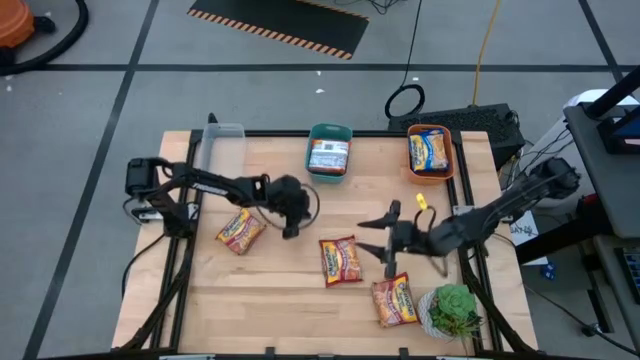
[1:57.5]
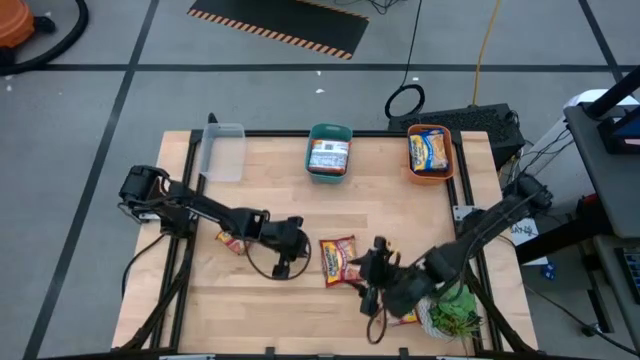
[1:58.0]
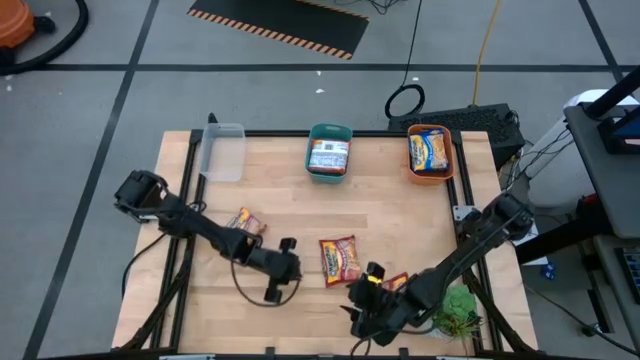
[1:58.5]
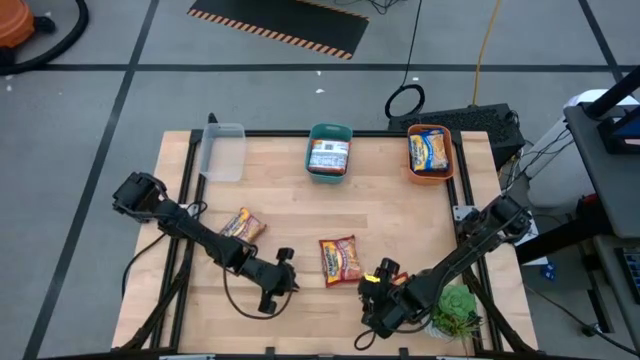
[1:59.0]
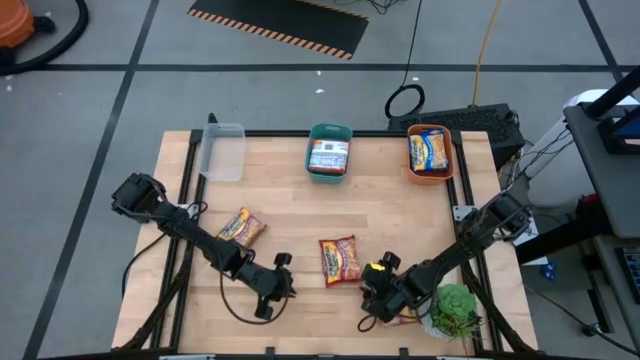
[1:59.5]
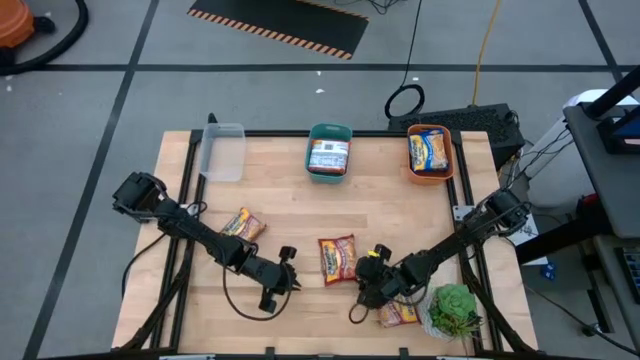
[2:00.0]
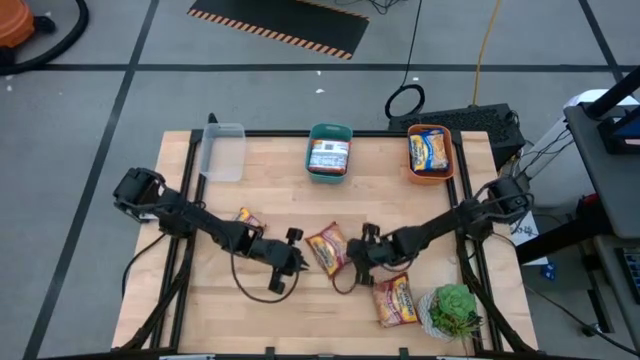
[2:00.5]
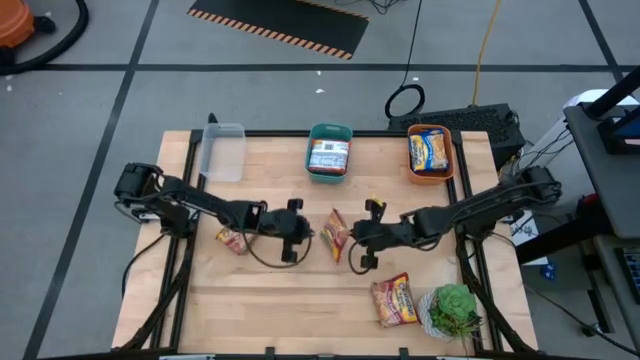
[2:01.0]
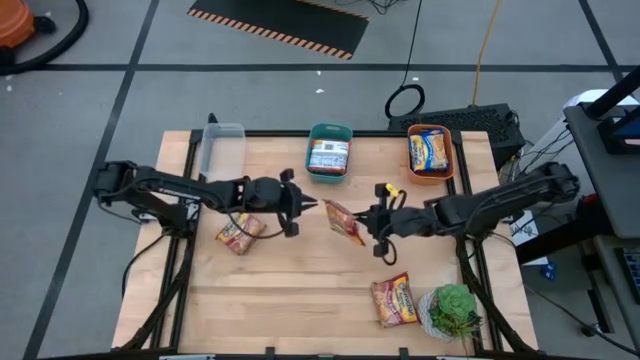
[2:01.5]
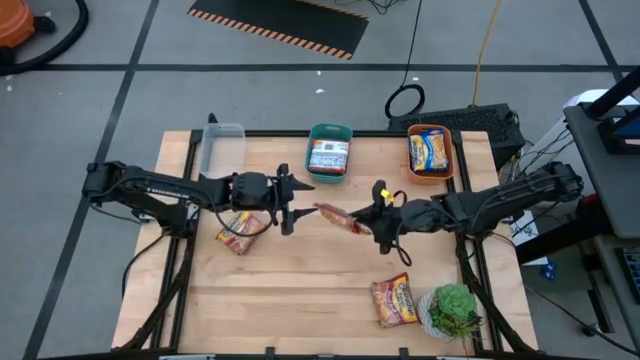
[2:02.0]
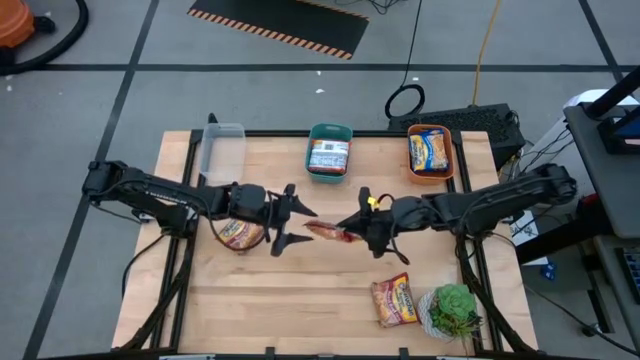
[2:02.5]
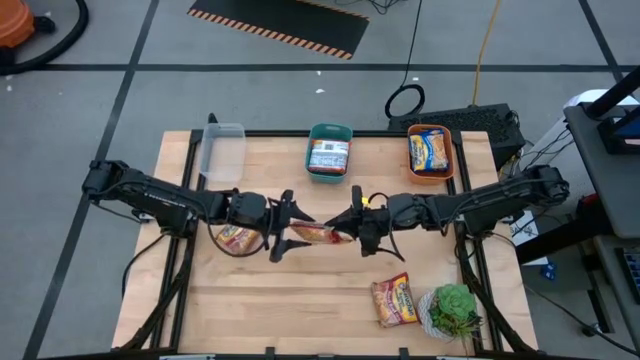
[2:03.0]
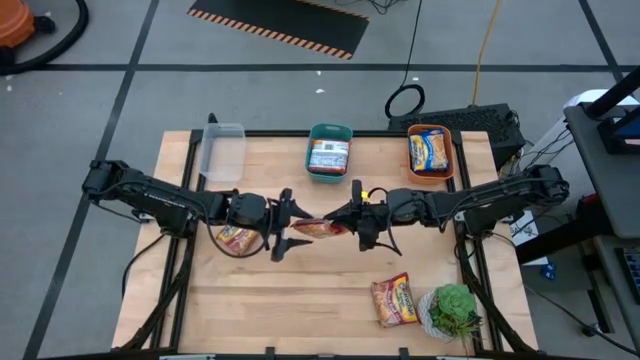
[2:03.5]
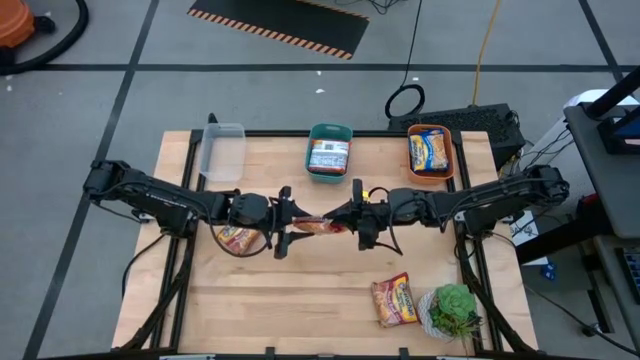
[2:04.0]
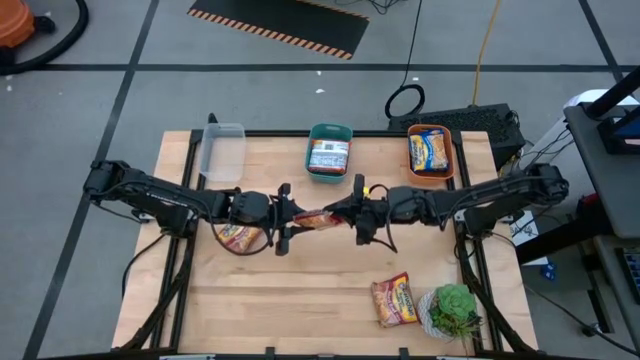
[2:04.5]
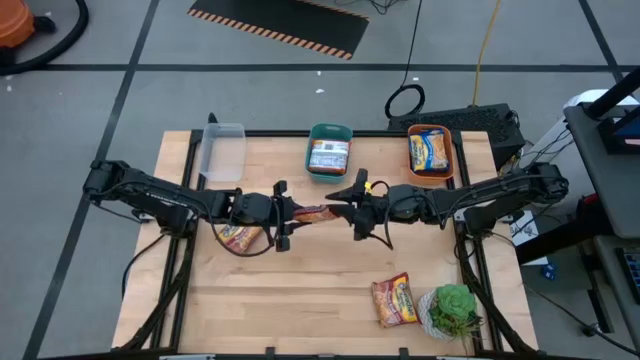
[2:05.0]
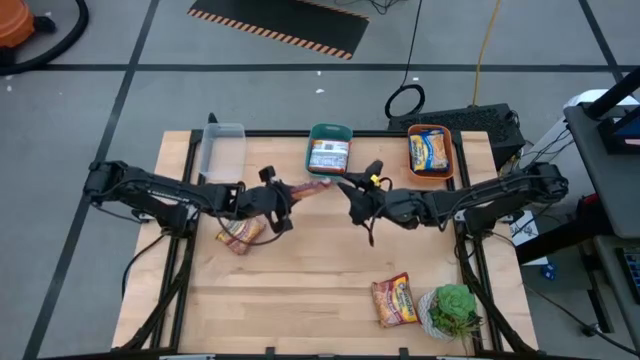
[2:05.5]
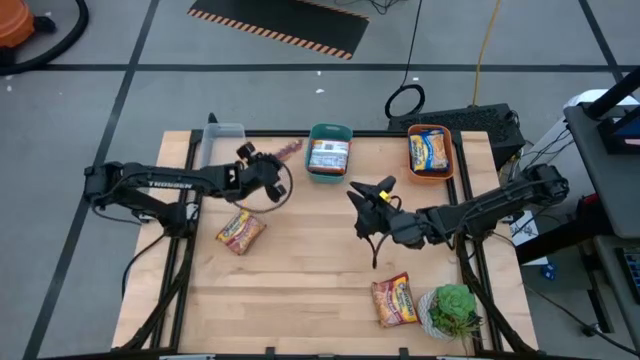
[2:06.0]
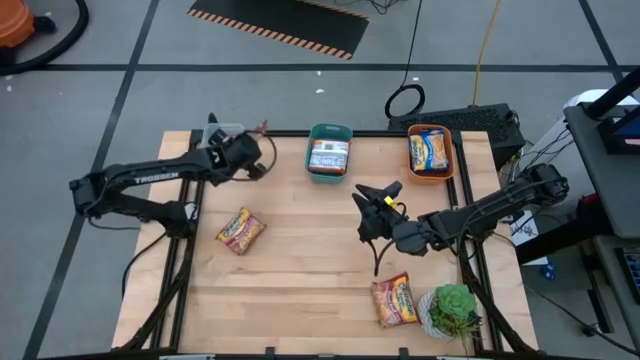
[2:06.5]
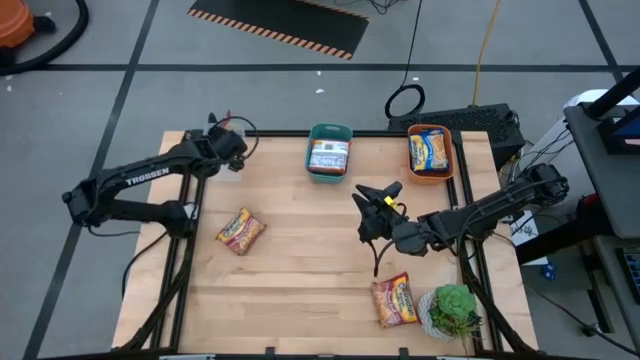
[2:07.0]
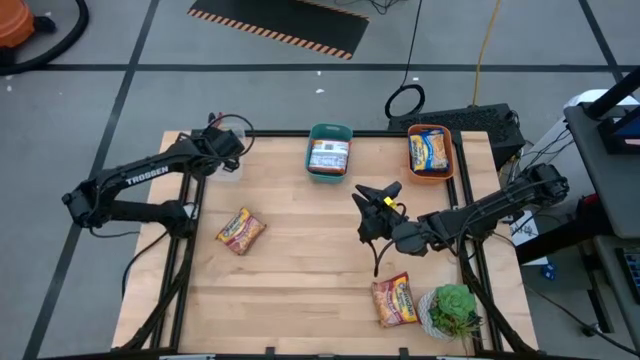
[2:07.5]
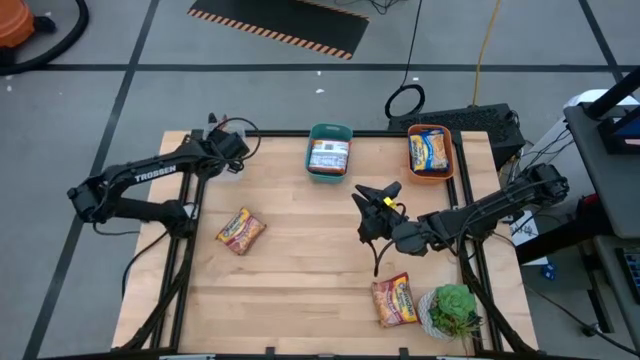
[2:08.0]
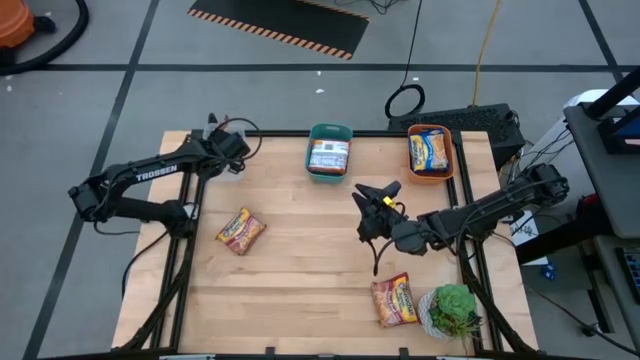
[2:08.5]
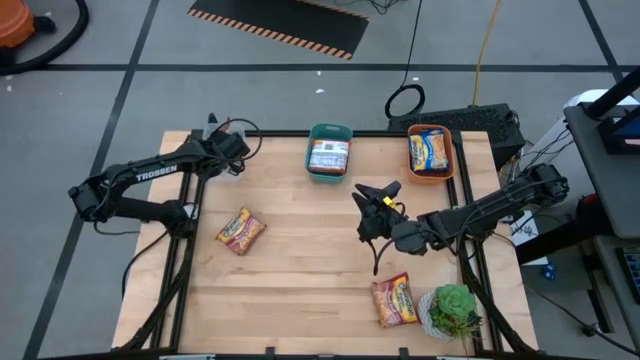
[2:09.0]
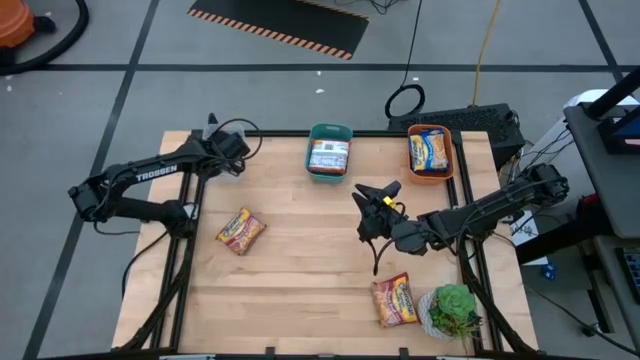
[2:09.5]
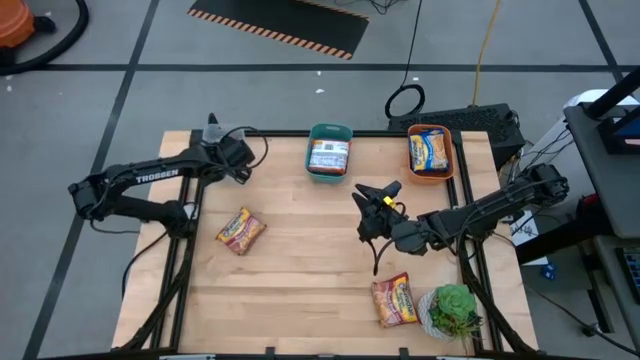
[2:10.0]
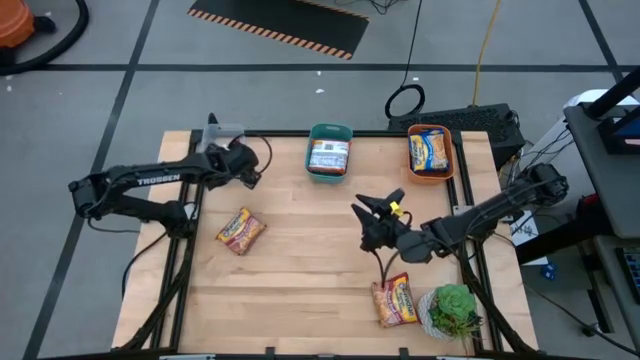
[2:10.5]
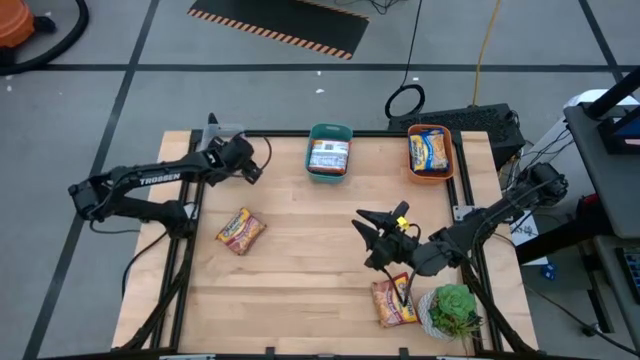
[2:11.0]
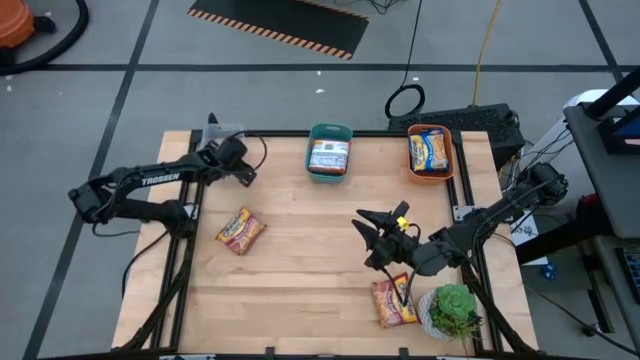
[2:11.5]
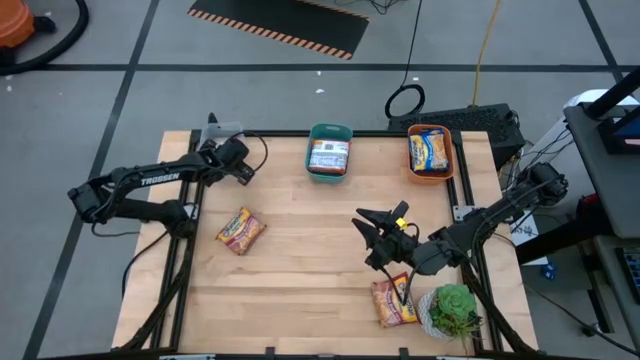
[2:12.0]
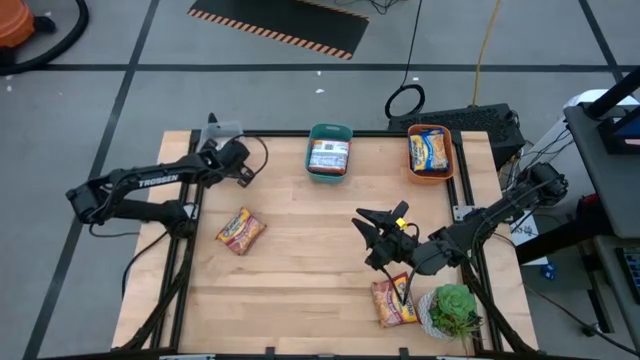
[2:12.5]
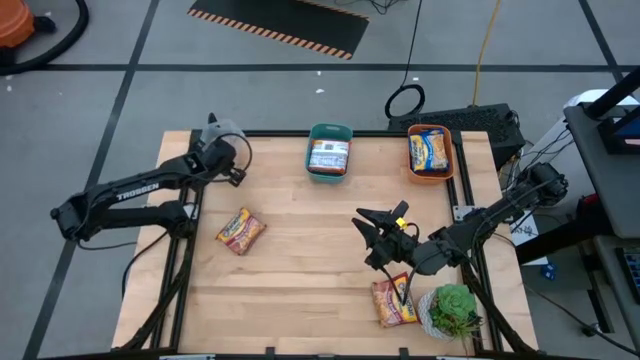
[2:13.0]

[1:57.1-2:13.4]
Task: Sort Maruchan noodles
Put the middle red noodle pack into the transparent bin

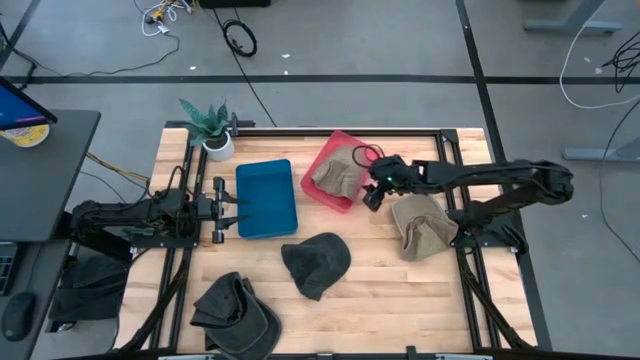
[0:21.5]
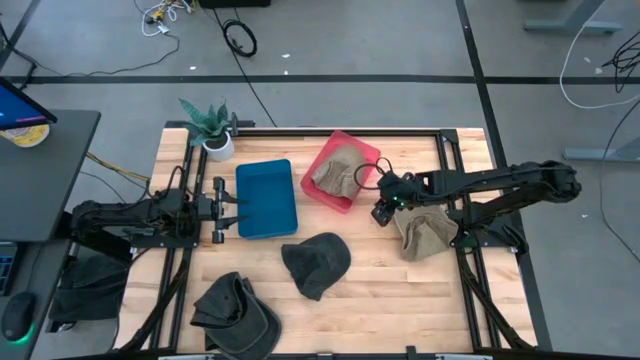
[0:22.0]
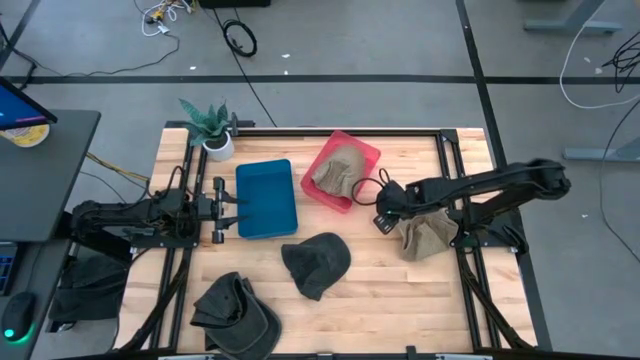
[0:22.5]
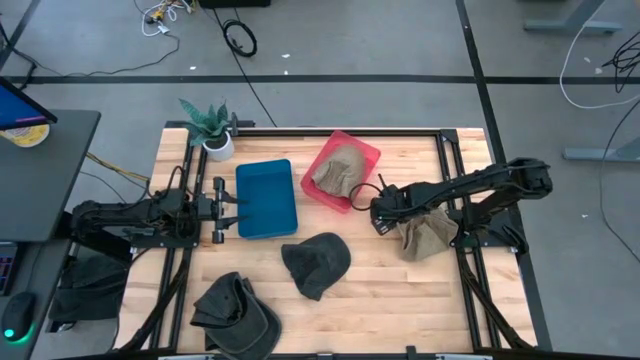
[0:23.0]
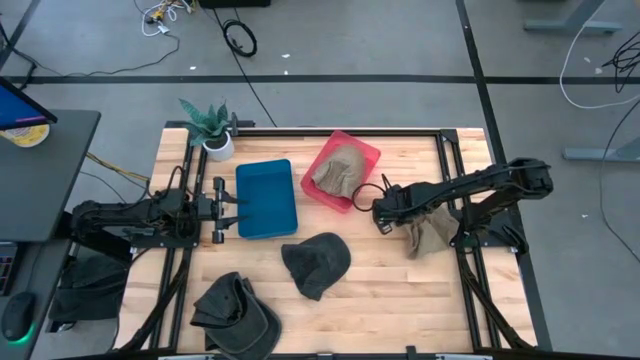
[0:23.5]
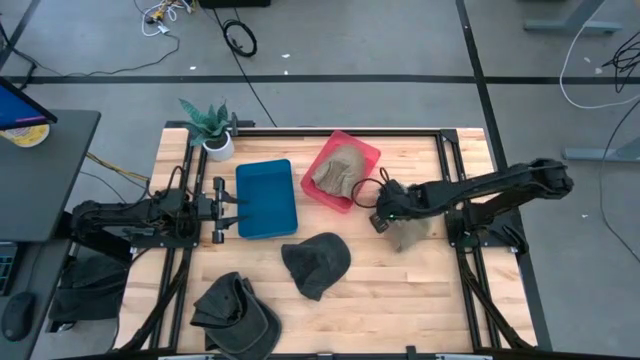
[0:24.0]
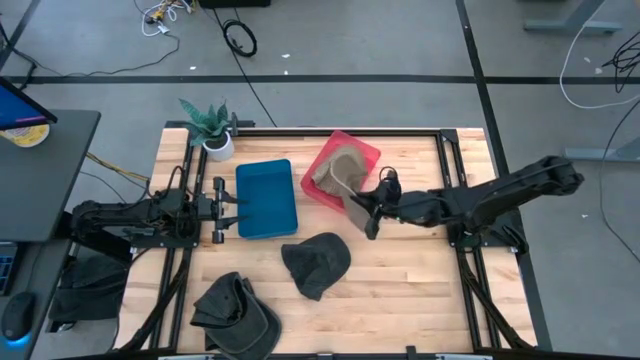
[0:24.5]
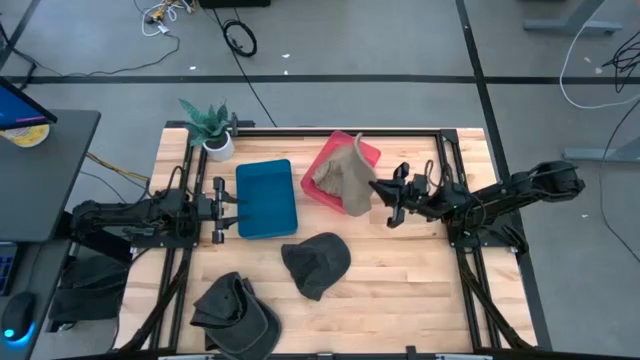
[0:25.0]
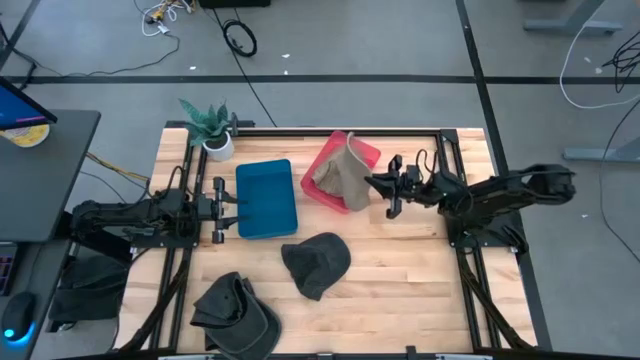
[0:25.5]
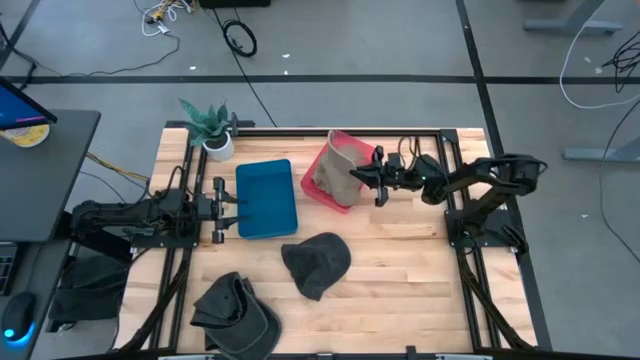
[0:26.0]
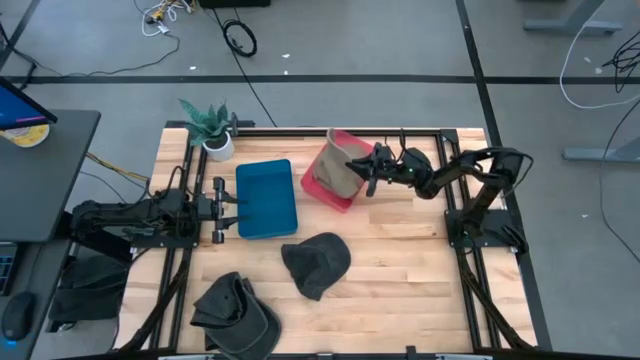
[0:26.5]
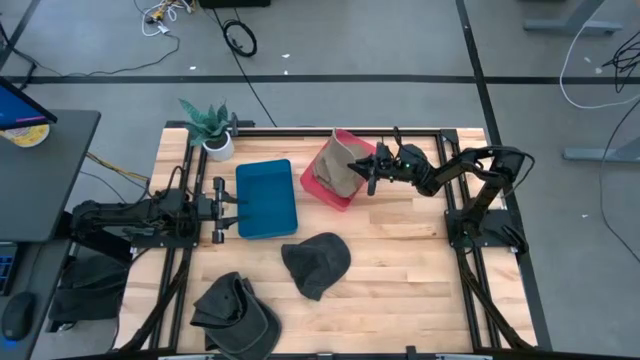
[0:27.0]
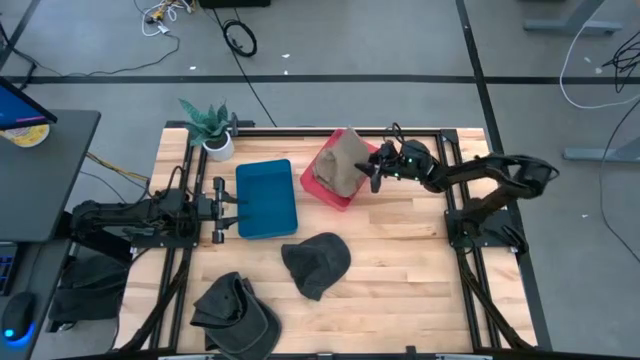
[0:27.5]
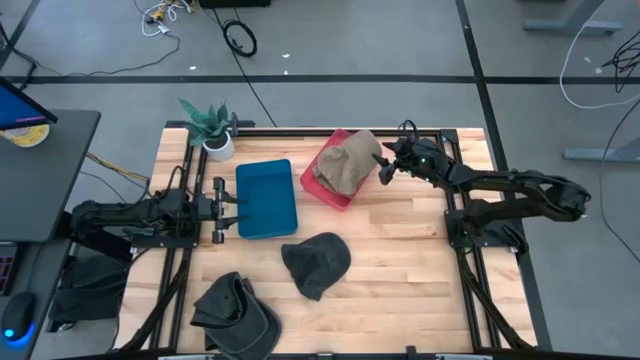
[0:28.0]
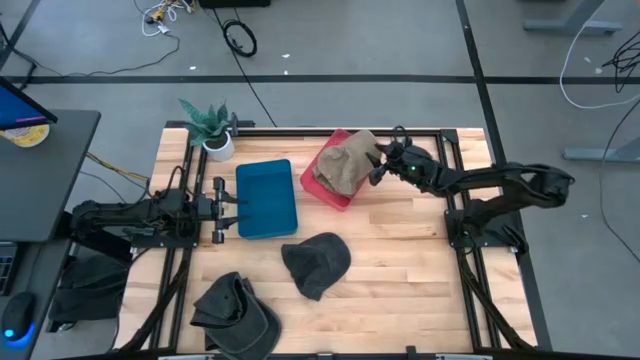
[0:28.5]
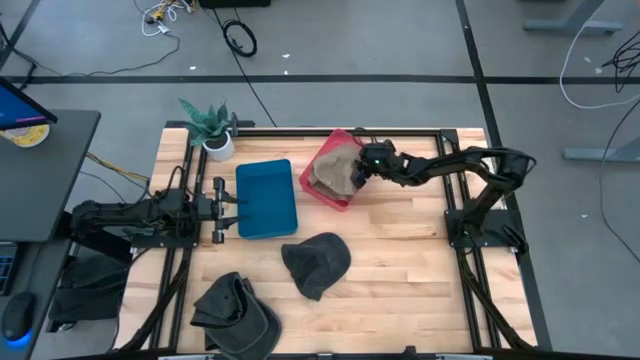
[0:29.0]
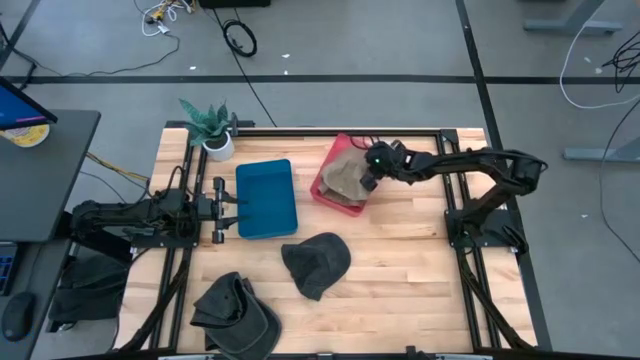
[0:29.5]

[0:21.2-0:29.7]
Task: Pick & Place hat
Put the brown cap into the pink bin
